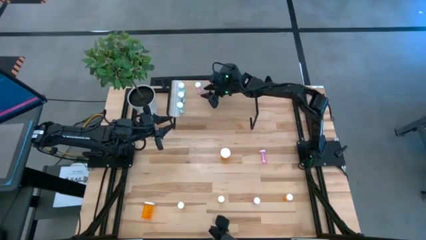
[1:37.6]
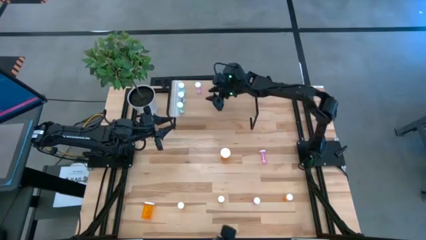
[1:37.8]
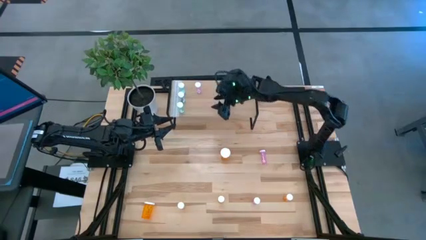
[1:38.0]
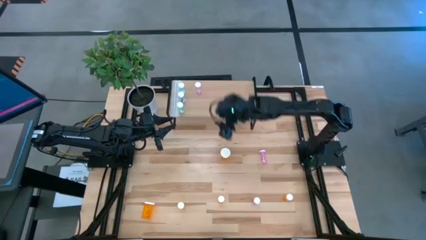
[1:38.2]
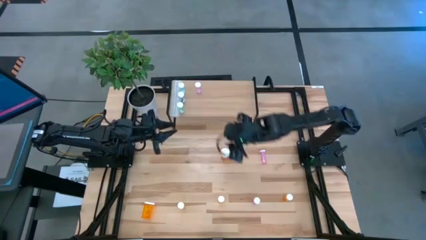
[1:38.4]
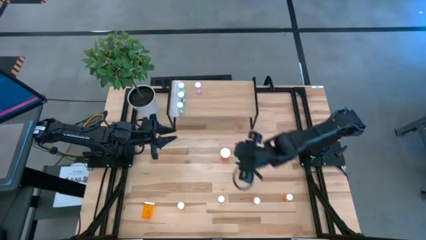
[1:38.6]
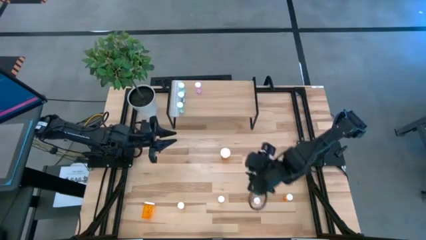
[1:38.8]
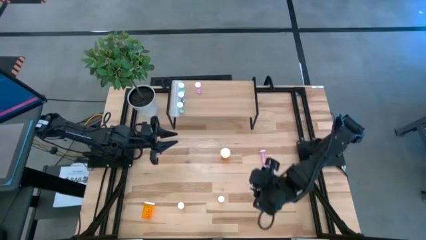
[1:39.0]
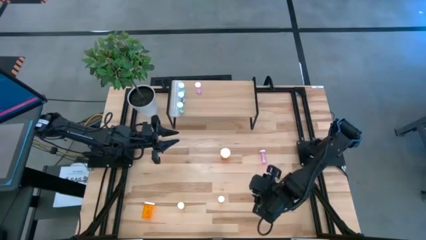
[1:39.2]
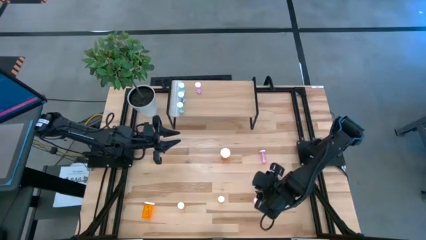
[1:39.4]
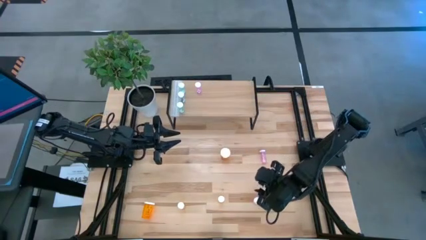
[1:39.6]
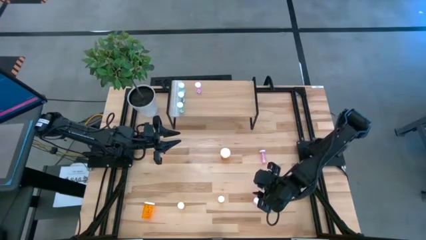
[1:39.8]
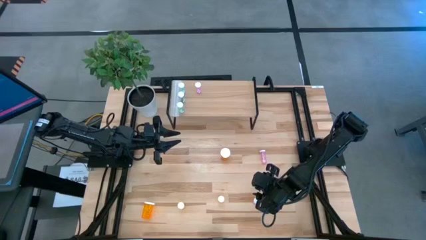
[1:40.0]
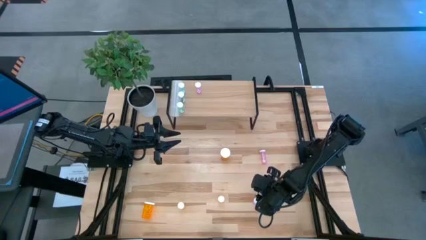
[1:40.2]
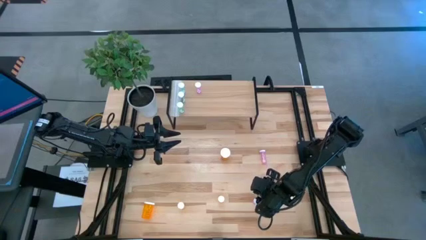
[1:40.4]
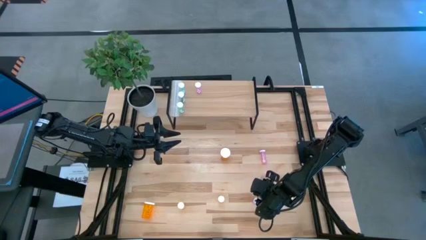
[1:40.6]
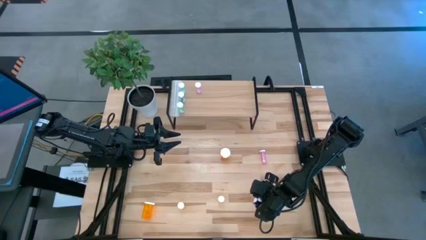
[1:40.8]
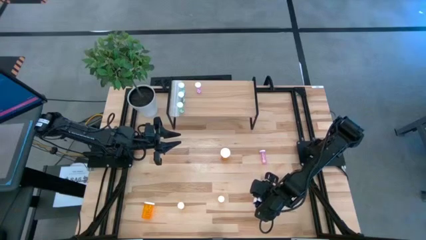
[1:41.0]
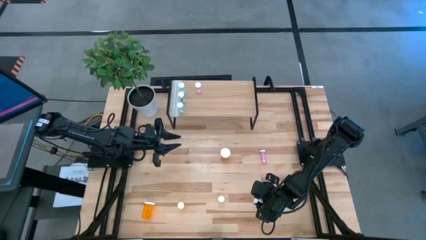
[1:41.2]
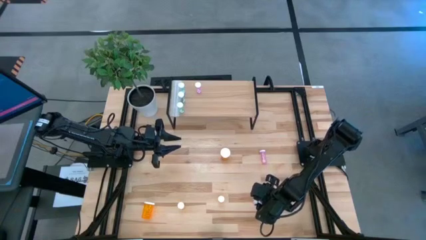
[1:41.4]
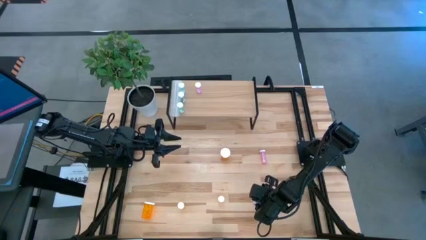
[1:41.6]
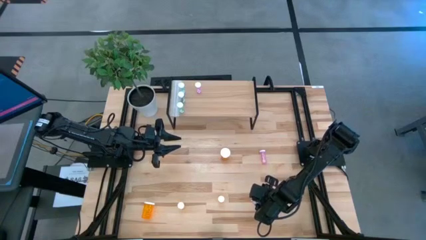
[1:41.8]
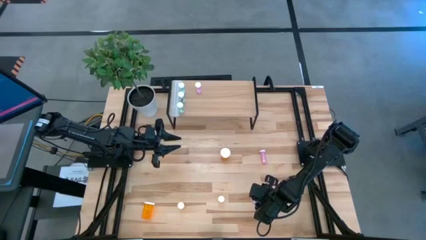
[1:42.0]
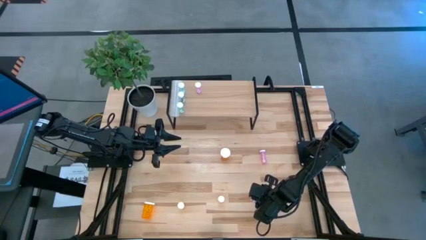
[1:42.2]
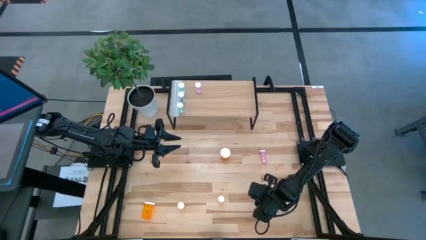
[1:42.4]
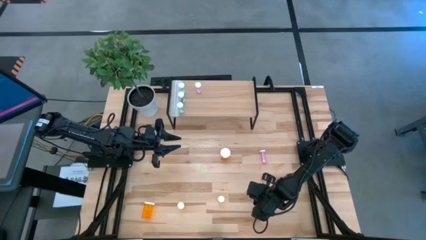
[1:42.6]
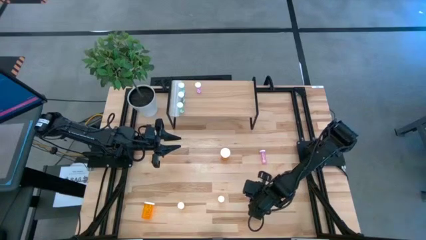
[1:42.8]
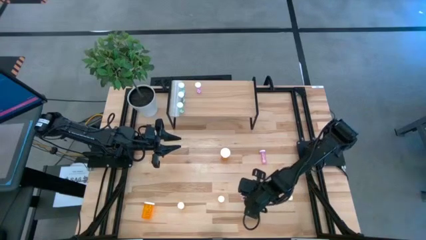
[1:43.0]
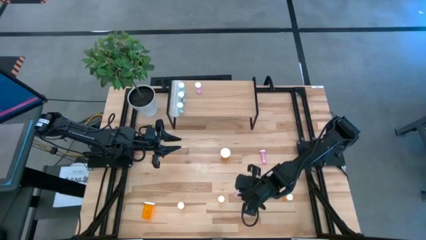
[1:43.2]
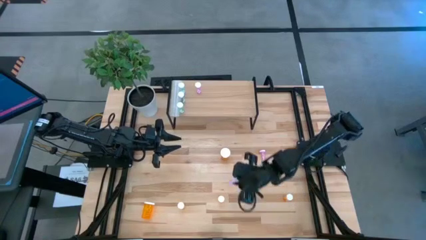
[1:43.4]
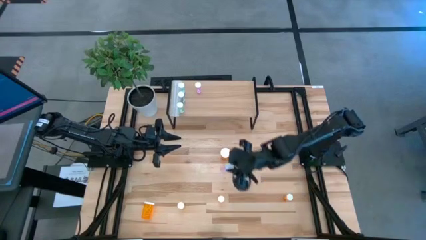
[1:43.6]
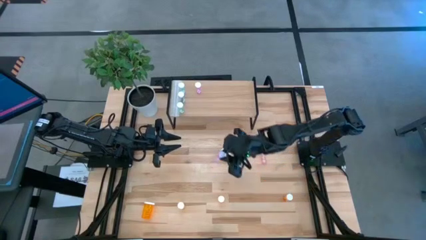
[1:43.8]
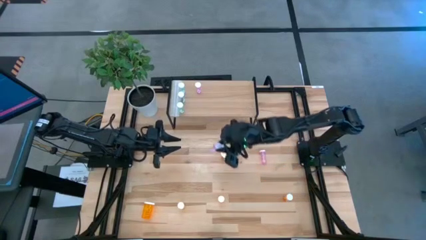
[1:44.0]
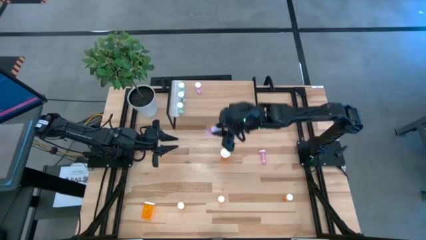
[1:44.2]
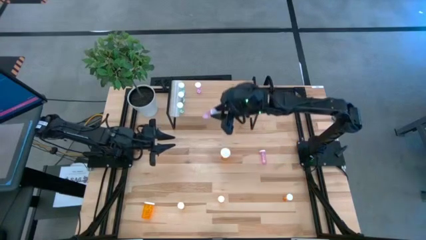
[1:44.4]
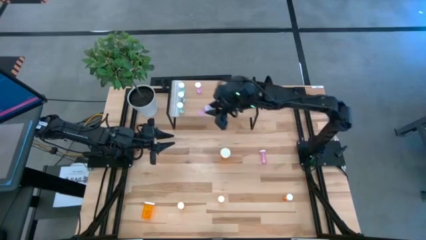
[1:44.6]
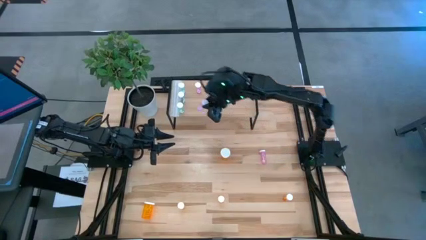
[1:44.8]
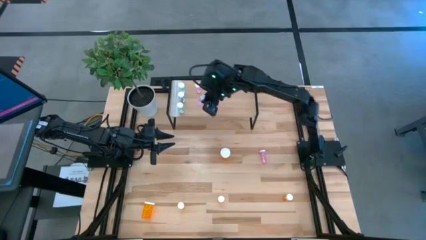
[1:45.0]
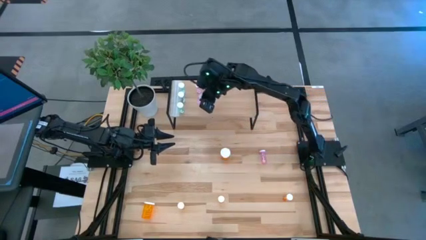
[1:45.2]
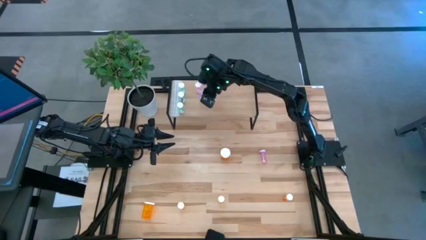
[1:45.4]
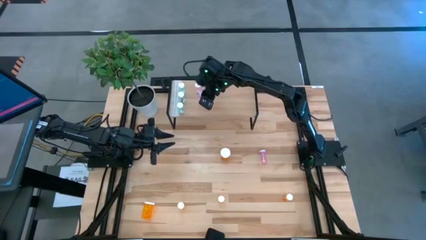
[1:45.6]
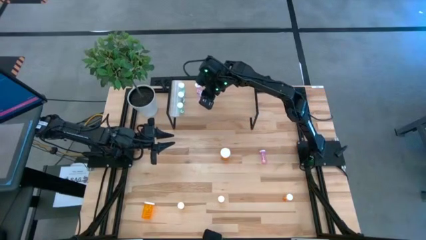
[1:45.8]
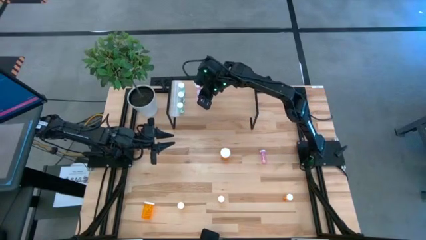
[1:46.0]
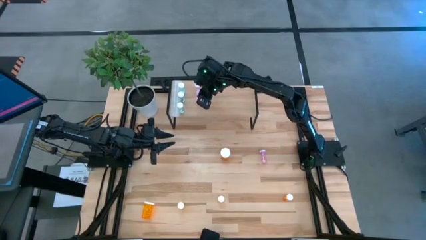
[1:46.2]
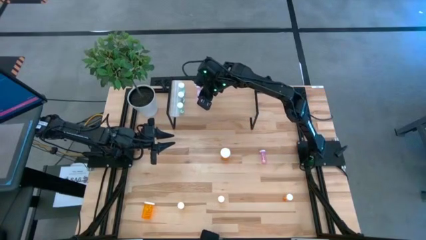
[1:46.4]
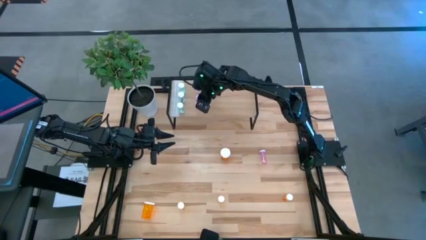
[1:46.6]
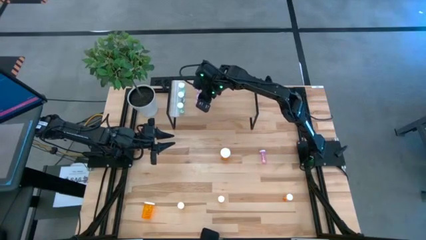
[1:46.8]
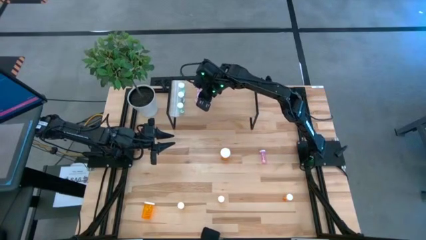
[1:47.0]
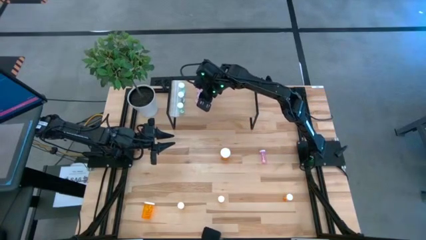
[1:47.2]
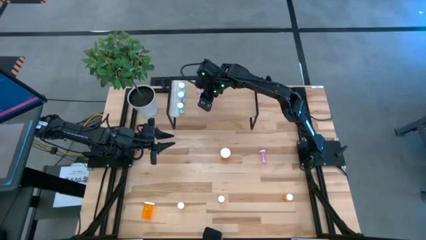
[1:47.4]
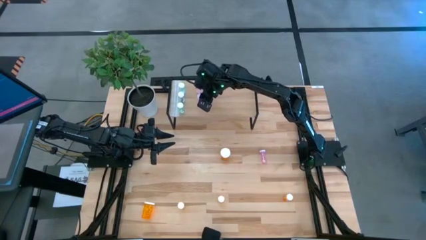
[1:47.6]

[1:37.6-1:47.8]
Task: Pick and place medicine bottles onto shelf by color
Put the bottom pink pill bottle on the shelf aligned with the other pink pill bottle

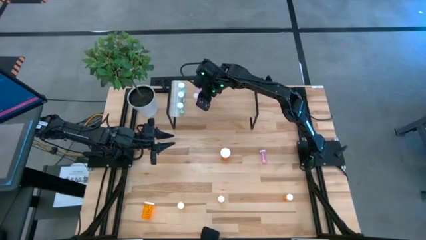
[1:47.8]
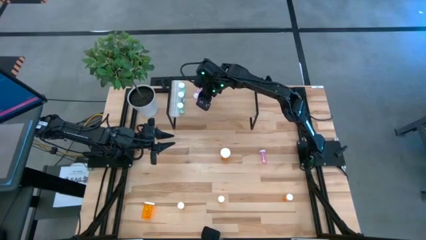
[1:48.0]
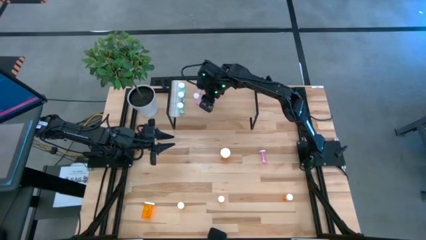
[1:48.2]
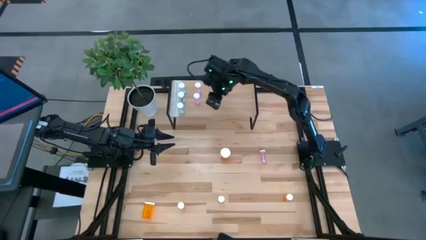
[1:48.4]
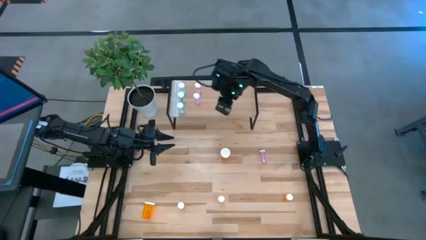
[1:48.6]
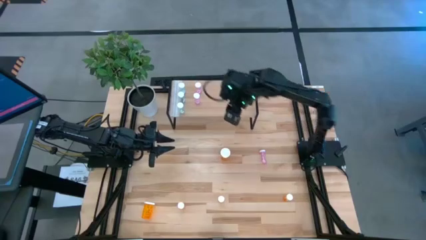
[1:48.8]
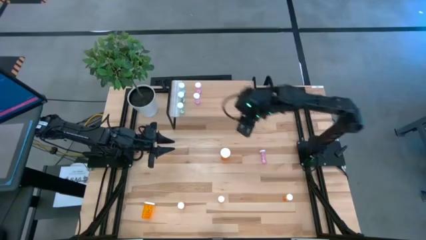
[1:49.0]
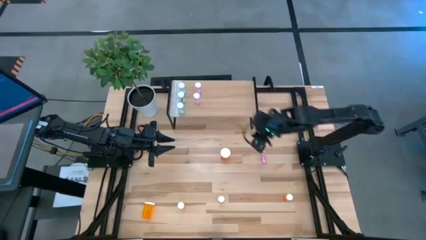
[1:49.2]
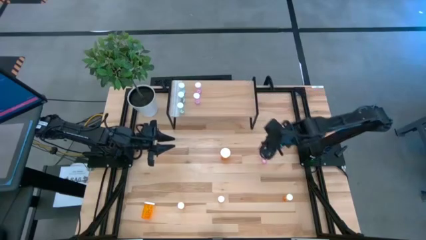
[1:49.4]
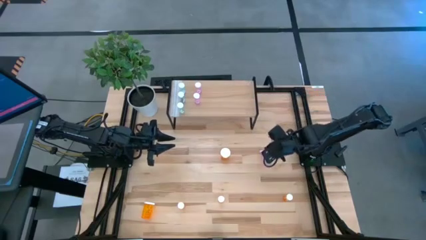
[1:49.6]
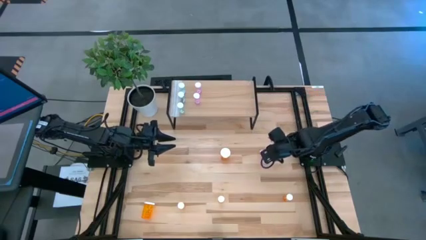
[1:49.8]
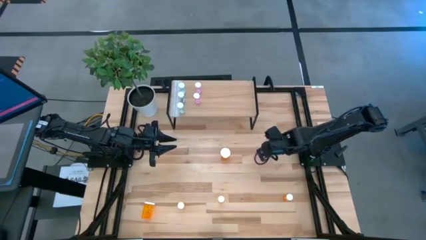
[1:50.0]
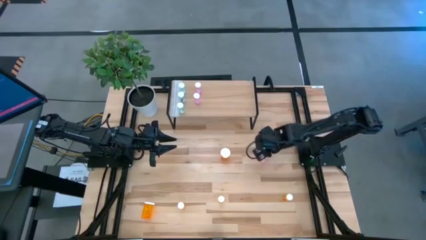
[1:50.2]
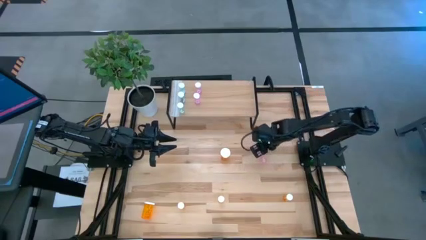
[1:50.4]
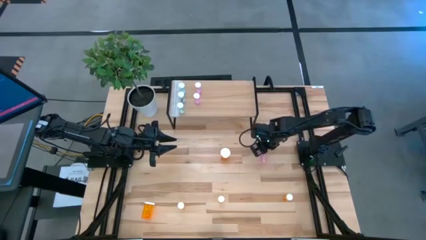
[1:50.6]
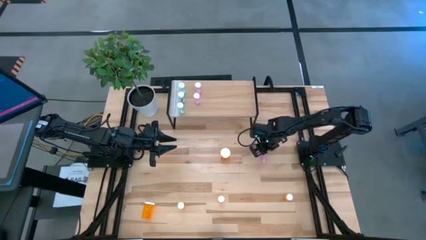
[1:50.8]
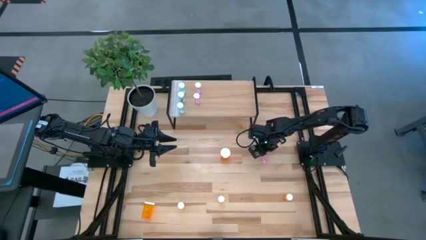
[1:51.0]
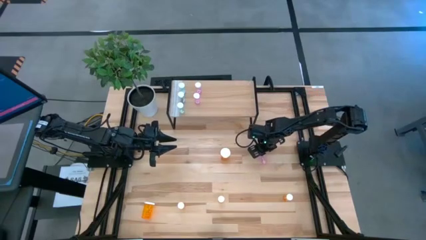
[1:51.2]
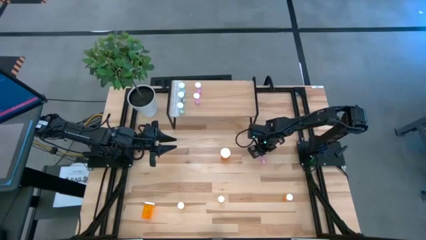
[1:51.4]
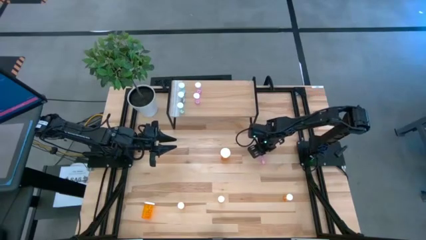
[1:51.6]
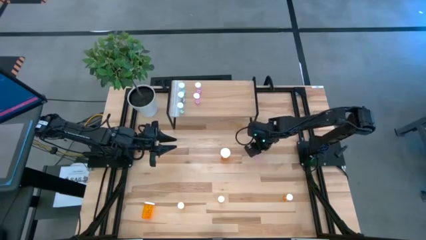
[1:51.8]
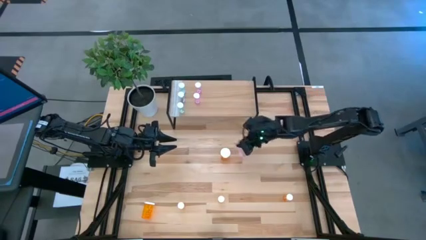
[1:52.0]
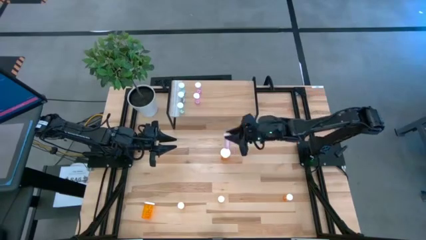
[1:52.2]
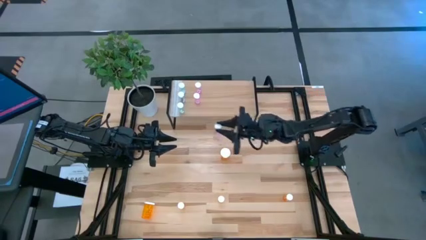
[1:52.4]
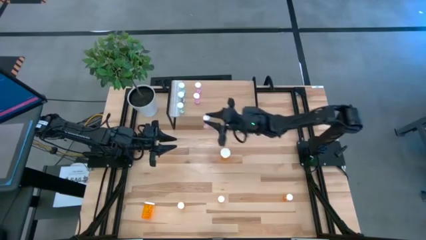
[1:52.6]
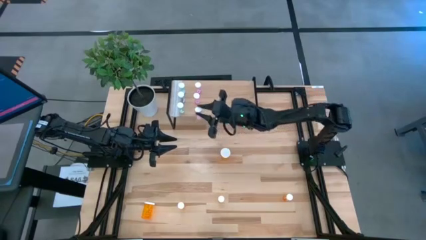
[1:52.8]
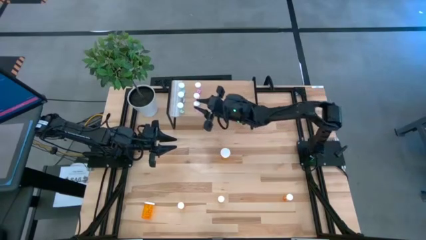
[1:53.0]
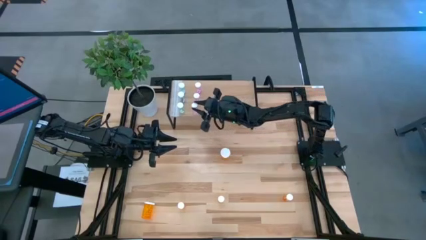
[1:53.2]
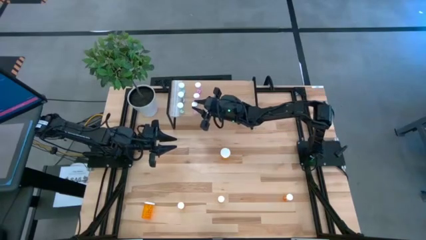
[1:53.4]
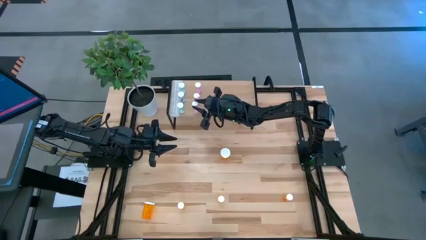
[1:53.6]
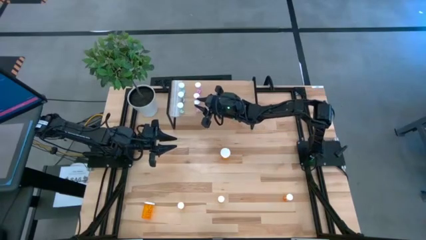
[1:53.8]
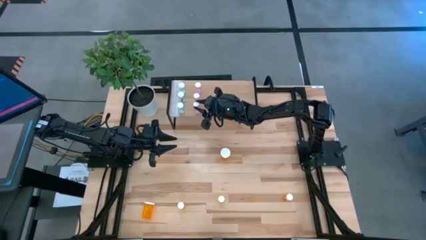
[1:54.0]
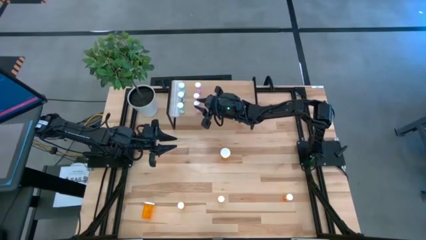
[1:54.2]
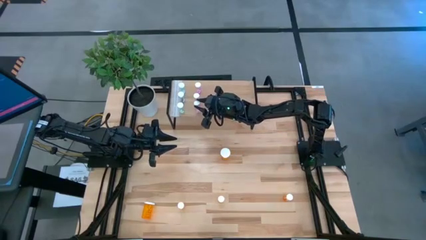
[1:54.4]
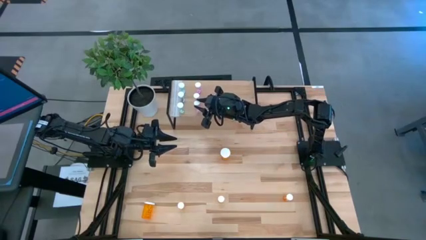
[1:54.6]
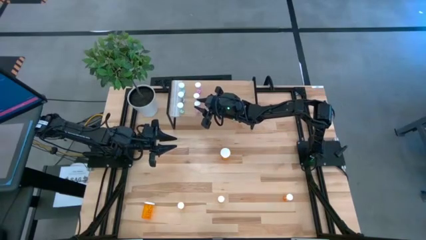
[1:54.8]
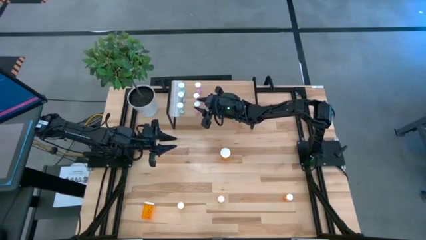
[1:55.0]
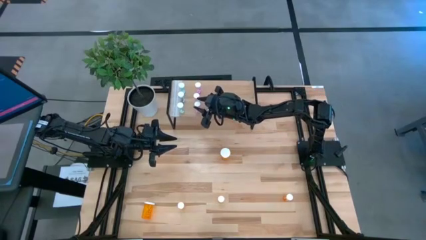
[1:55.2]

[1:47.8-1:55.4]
Put the pink pill bottle on the shelf aligned with the other pink pill bottles
